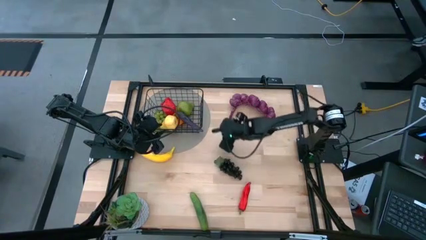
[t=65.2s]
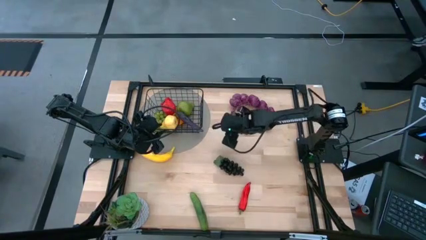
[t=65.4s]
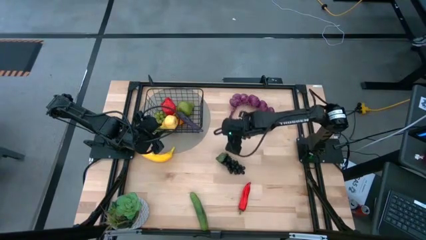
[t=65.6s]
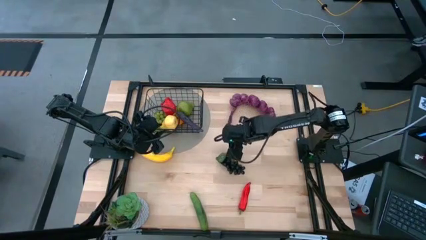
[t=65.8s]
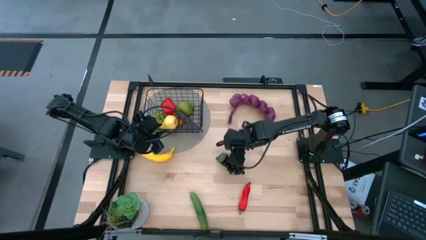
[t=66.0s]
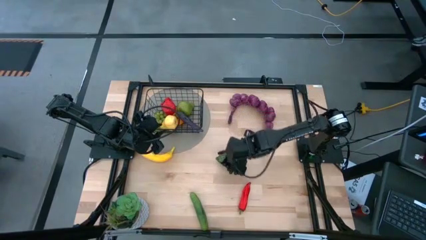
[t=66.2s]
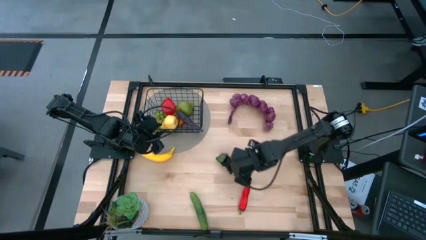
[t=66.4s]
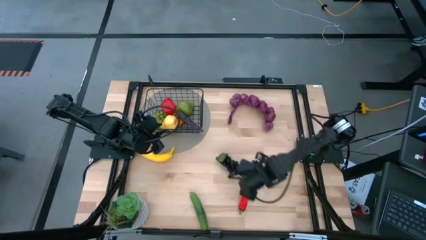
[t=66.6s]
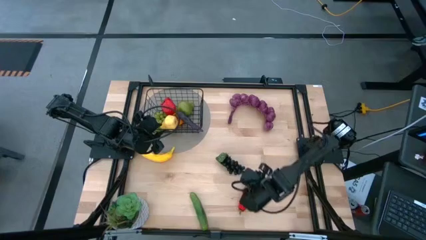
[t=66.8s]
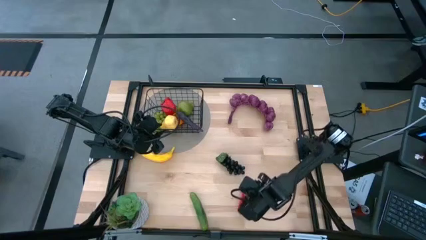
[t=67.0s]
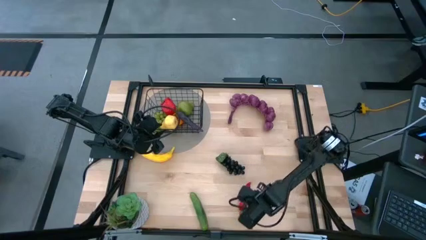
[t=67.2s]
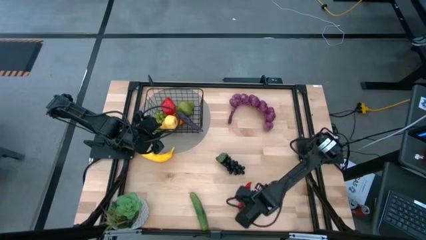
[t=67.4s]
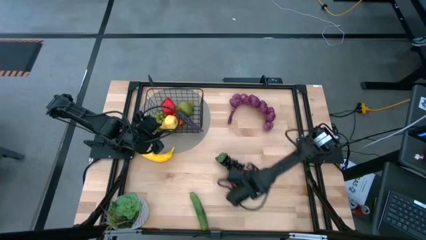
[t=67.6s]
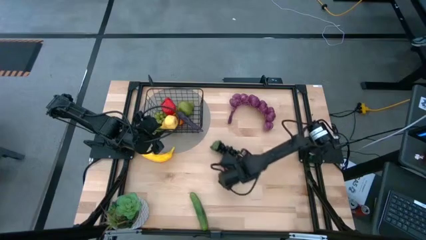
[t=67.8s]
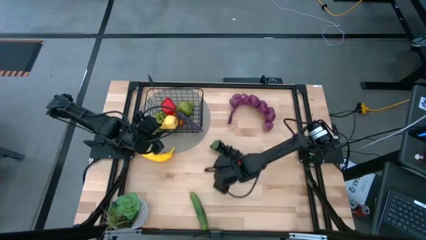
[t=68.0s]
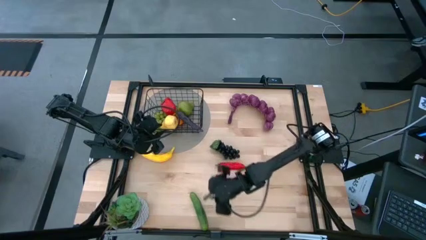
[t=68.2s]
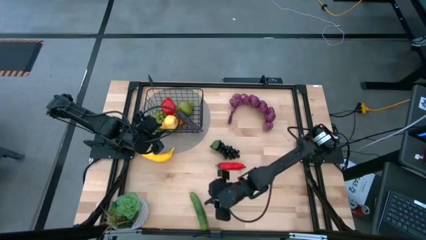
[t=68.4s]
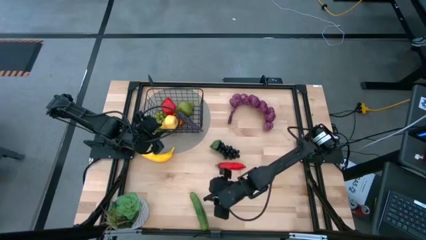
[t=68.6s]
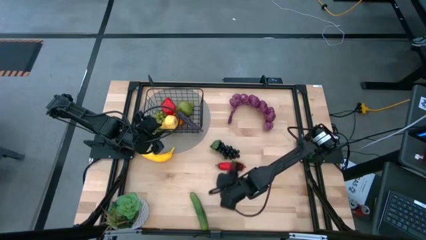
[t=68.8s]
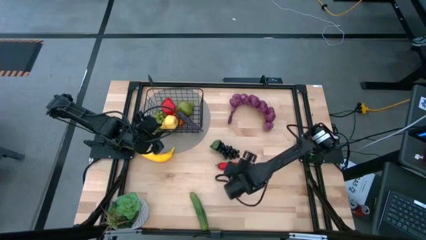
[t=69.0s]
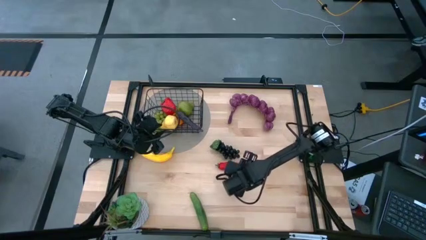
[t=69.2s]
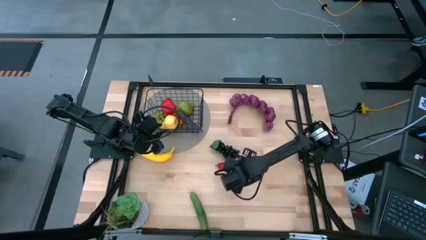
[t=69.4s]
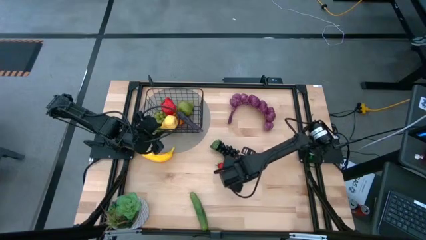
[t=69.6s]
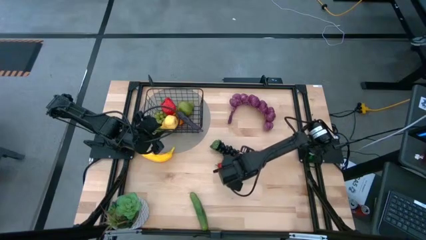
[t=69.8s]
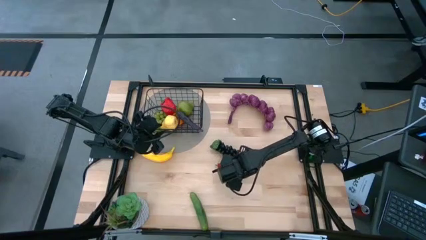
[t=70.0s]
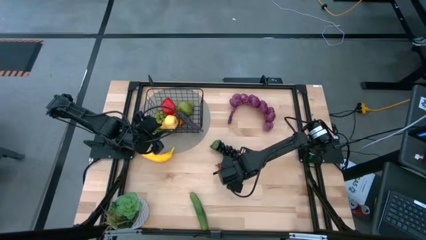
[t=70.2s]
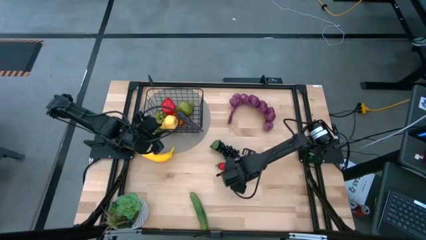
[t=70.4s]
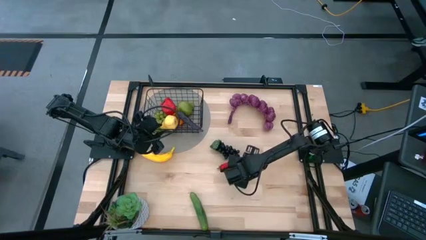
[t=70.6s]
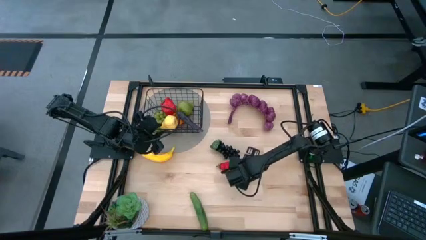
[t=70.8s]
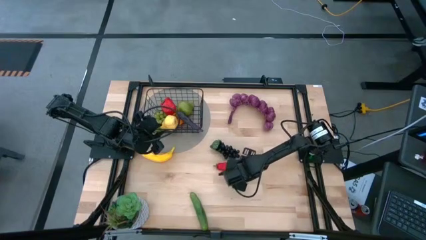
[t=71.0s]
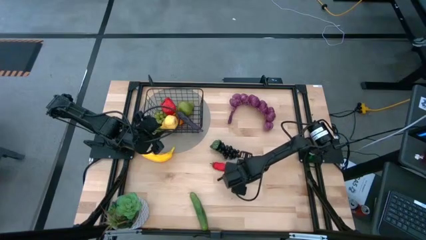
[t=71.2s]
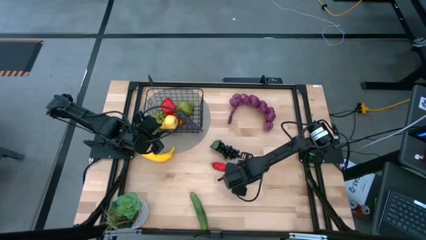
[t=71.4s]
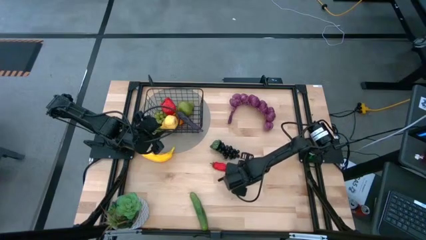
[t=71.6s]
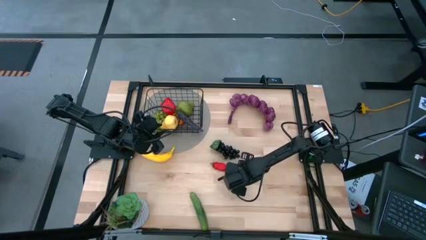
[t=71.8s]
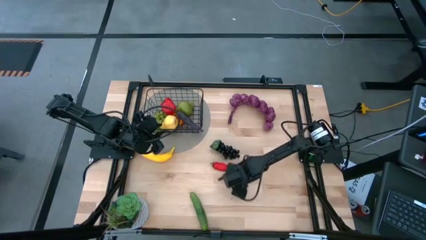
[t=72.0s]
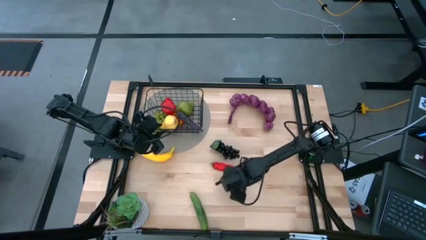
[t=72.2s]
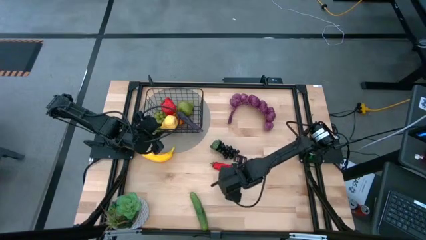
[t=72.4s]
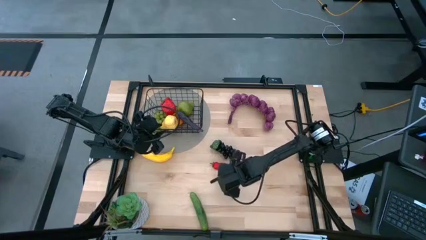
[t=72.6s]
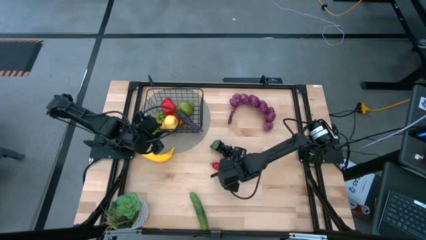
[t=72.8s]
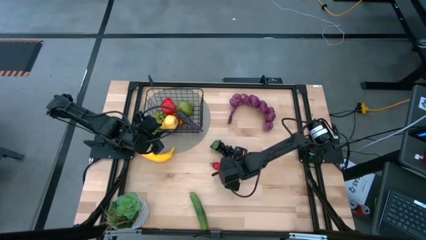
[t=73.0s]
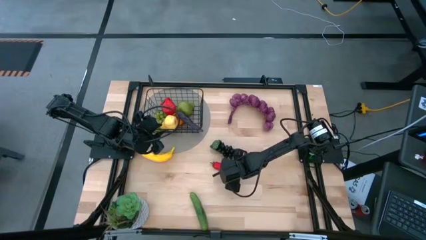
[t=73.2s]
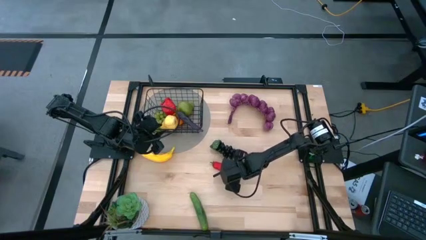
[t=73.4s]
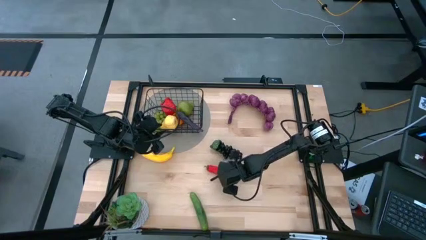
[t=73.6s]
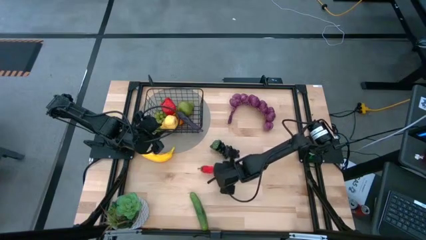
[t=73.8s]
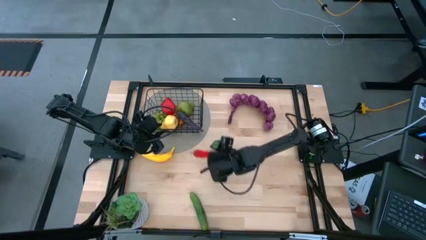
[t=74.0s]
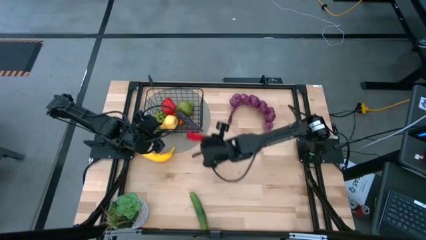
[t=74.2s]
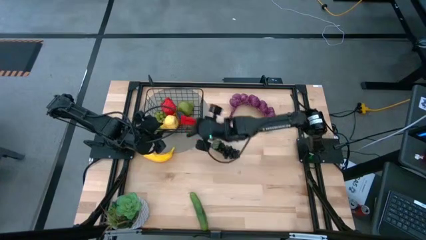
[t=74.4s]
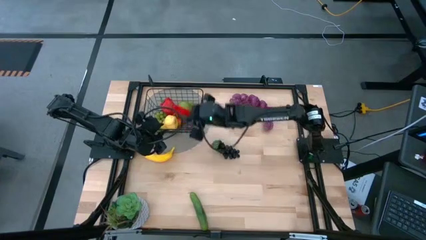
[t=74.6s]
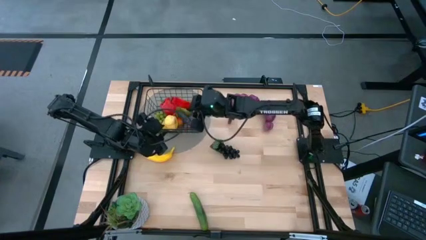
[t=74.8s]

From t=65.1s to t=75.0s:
Task: Build produce basket
Put the chili pepper into the wire basket

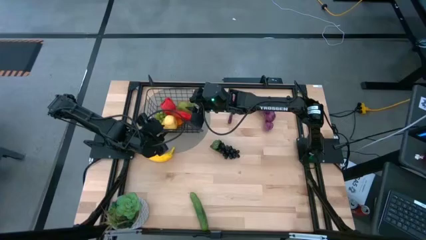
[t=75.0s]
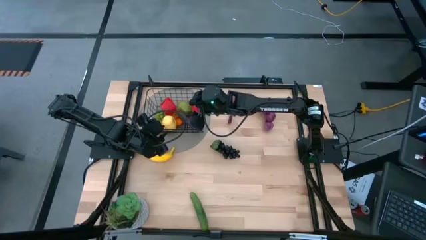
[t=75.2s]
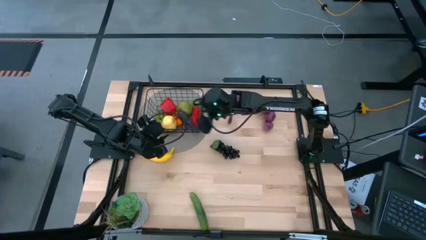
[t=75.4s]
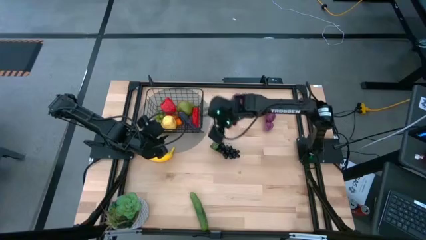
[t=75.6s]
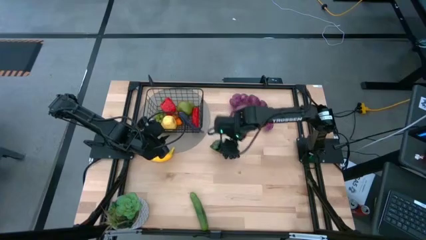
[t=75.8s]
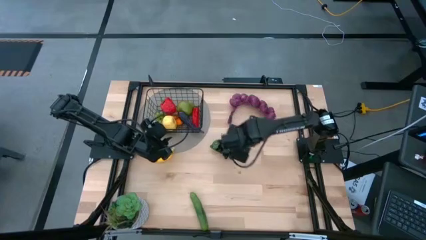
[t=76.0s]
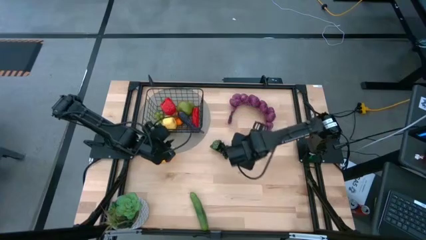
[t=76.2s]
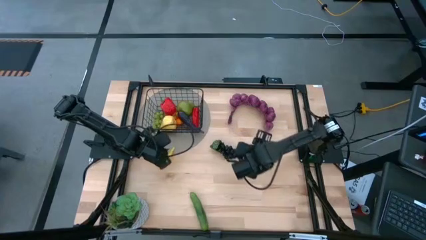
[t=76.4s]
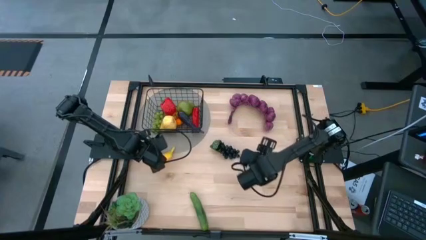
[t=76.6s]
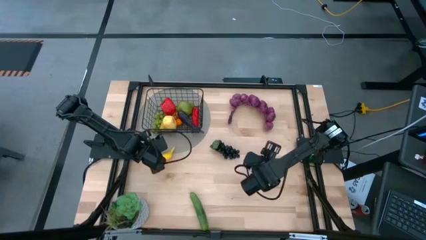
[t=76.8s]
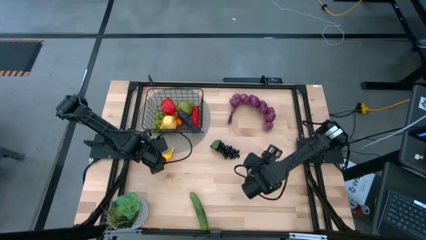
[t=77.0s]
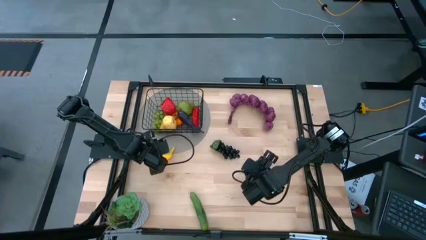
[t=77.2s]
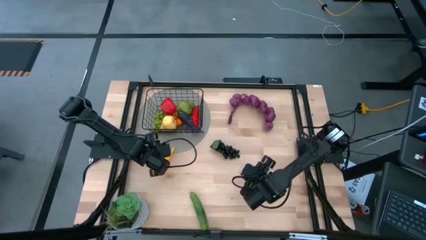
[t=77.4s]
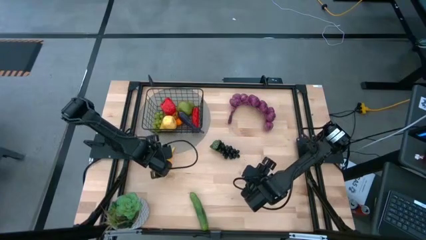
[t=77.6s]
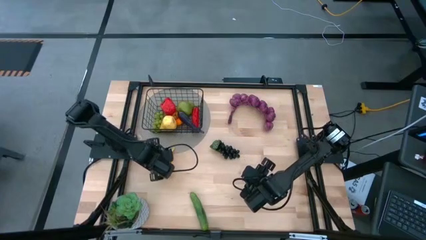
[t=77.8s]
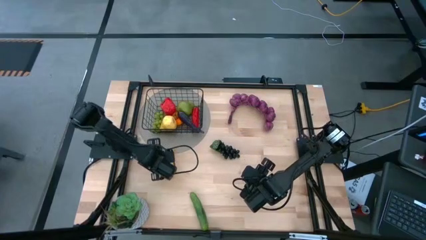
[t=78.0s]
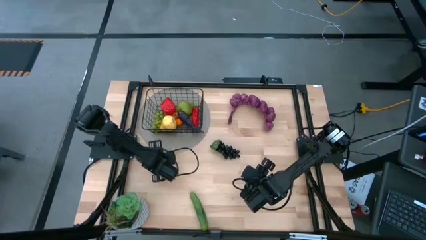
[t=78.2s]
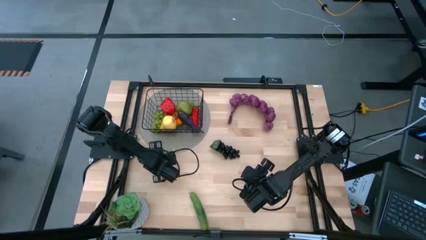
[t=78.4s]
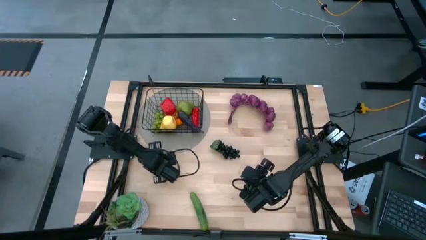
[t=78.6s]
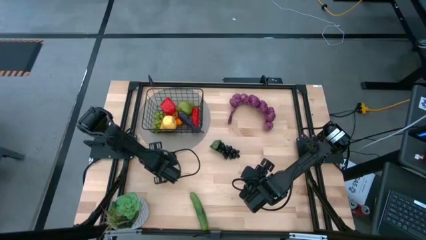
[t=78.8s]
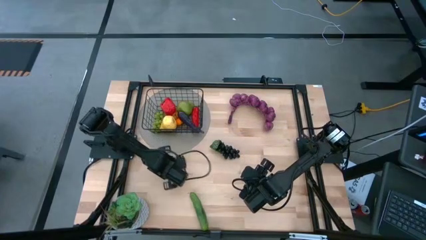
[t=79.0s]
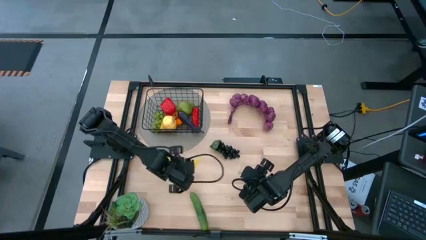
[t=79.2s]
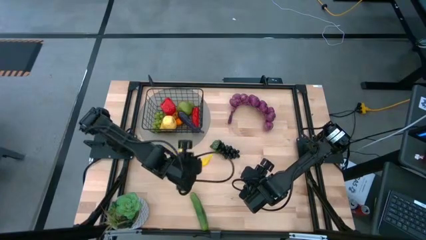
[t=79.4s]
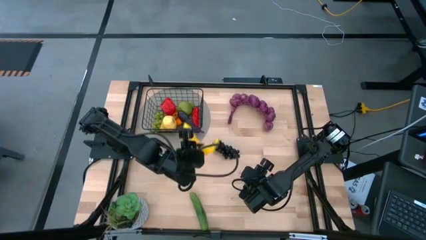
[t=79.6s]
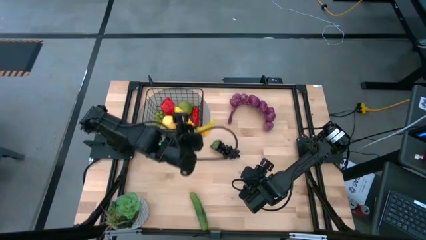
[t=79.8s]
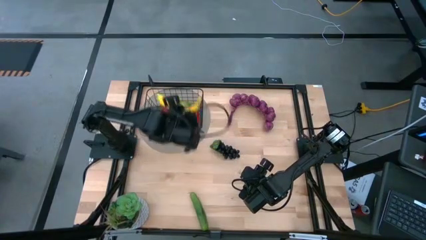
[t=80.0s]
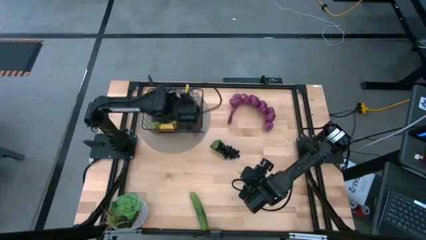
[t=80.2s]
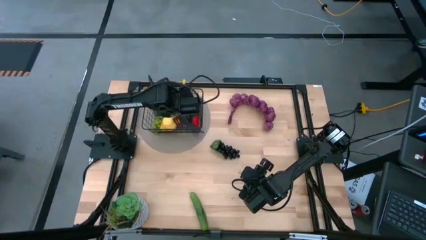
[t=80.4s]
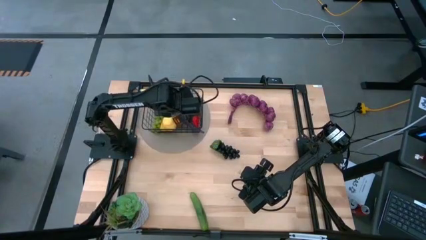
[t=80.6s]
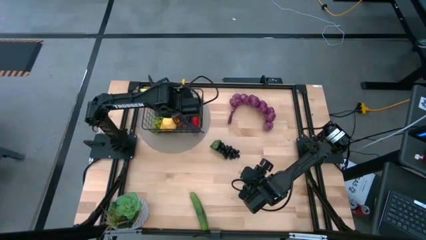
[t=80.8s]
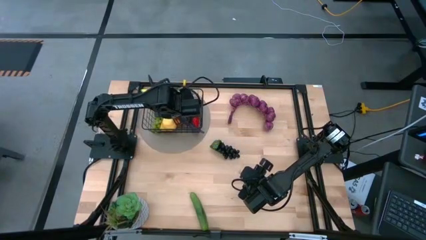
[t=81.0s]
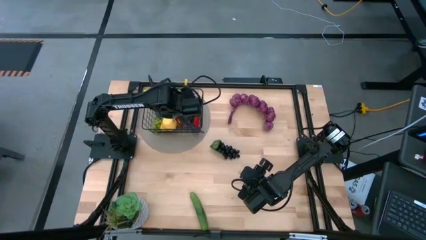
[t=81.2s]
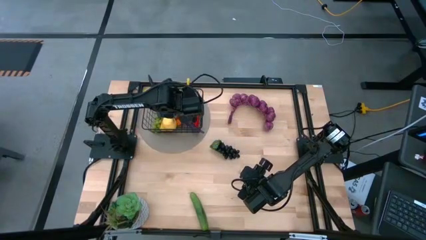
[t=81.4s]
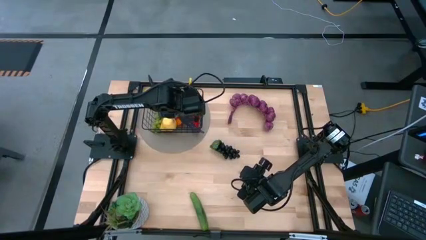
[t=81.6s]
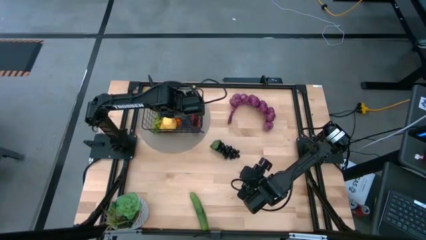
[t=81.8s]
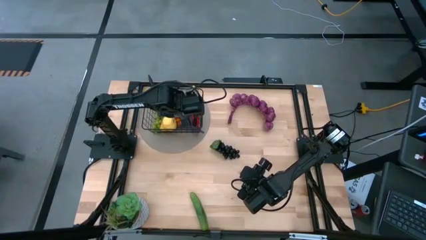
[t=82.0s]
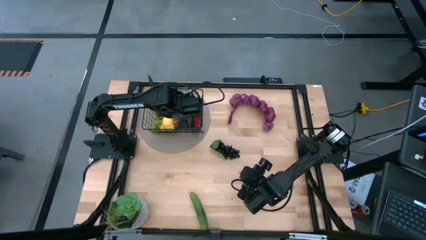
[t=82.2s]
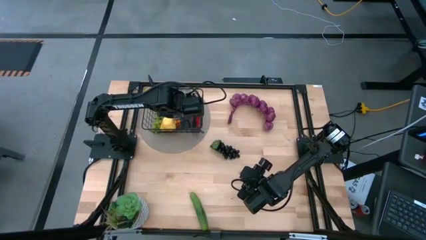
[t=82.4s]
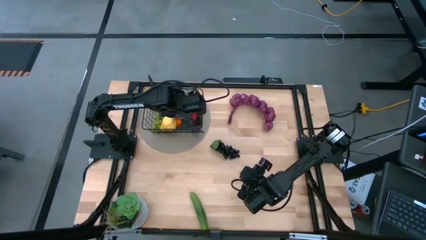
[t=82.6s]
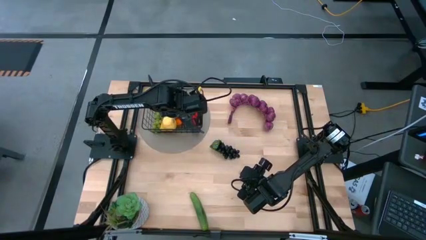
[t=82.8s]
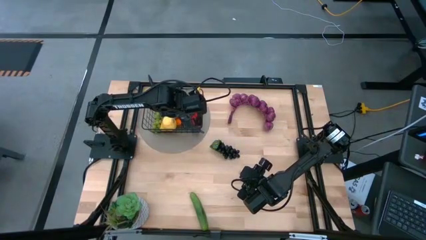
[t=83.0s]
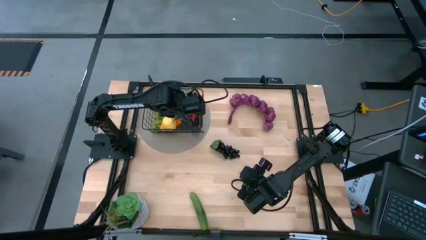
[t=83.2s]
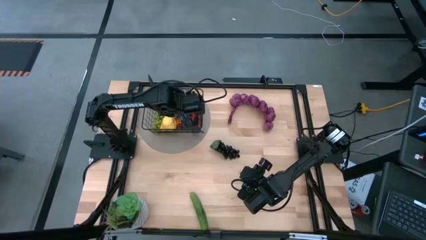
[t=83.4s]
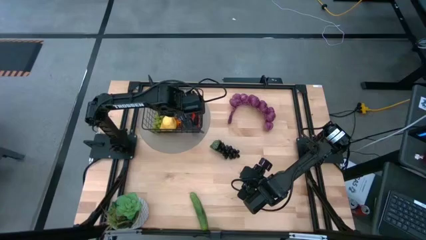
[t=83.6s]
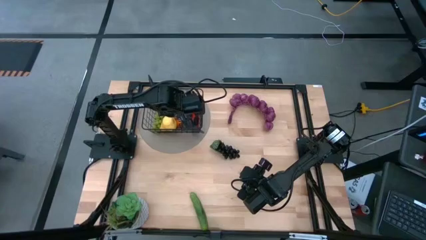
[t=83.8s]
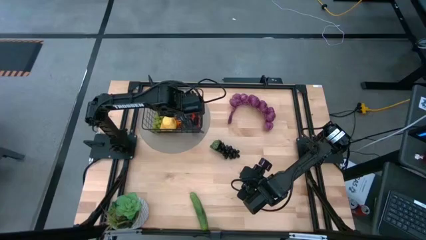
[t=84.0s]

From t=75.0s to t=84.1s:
Put the banana into the wire basket
